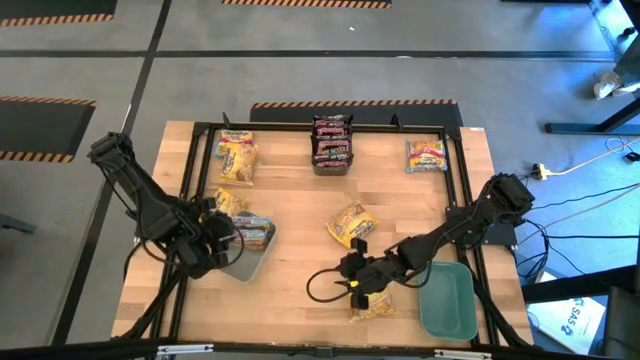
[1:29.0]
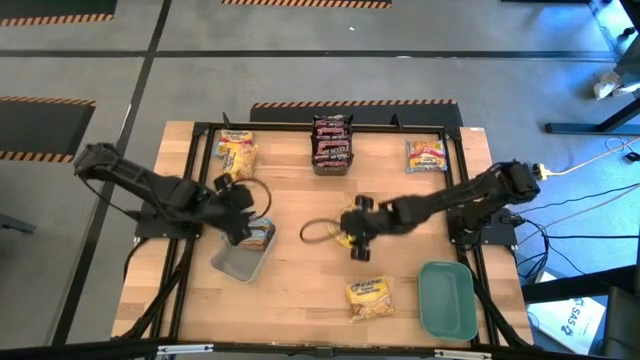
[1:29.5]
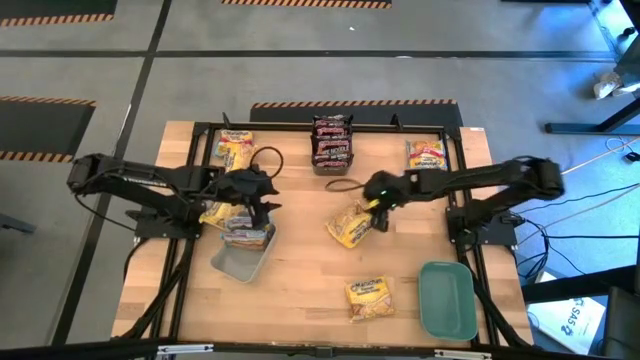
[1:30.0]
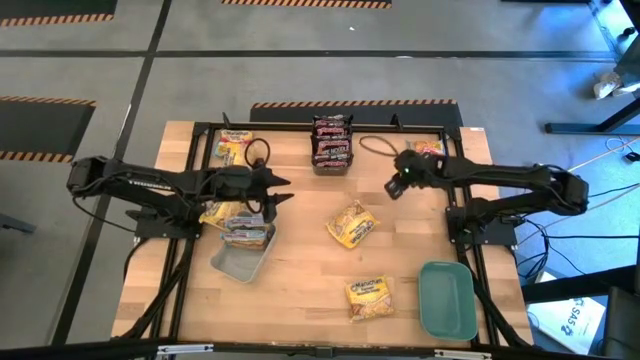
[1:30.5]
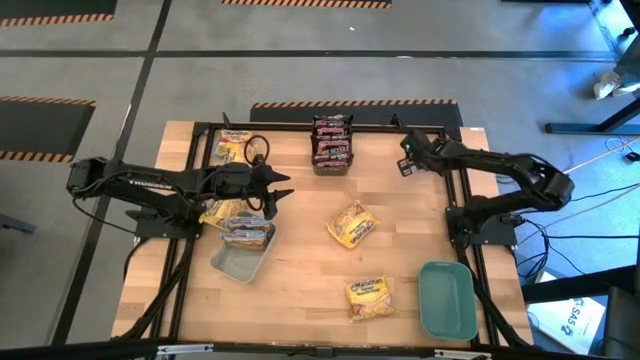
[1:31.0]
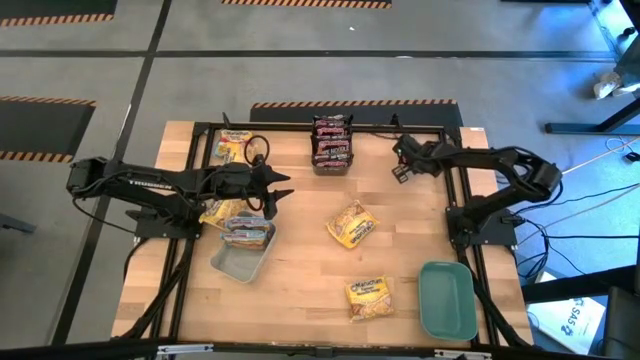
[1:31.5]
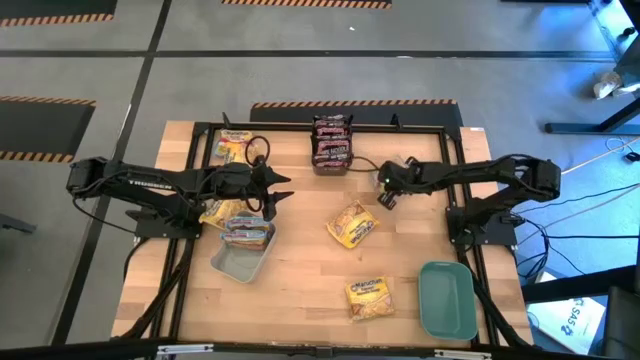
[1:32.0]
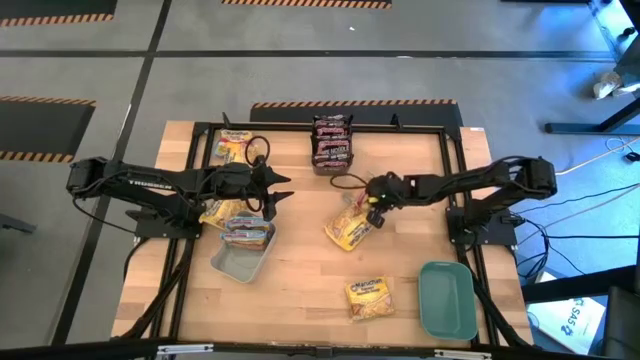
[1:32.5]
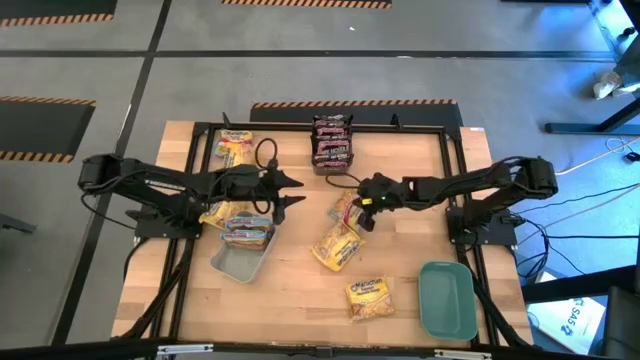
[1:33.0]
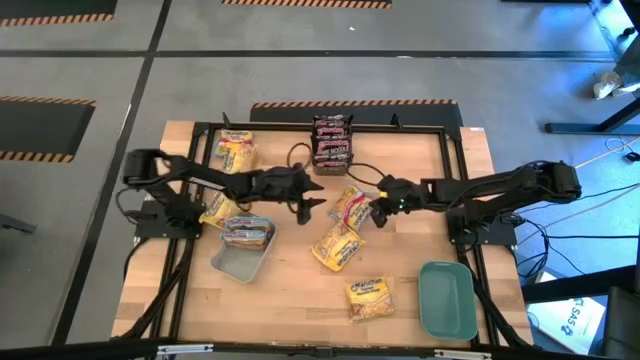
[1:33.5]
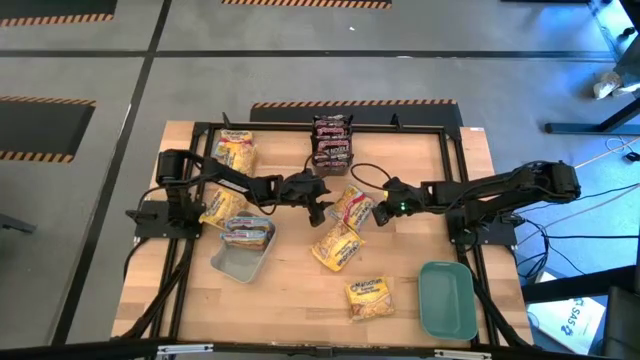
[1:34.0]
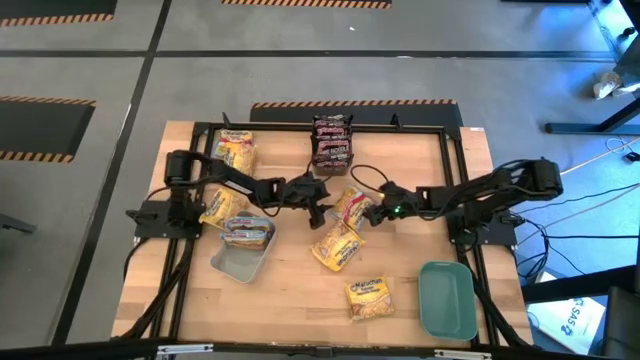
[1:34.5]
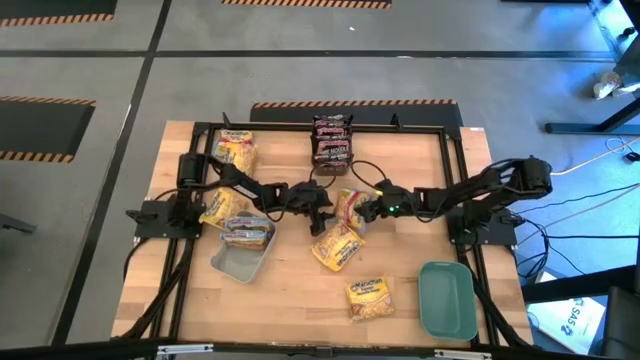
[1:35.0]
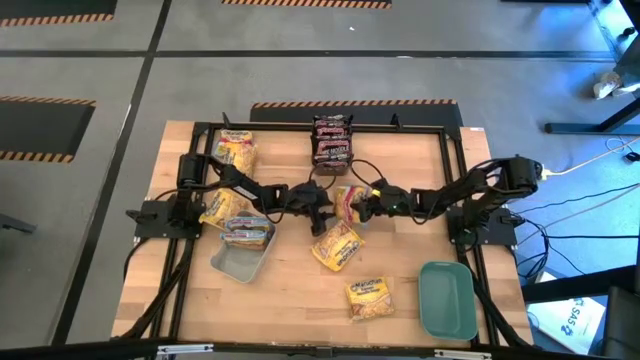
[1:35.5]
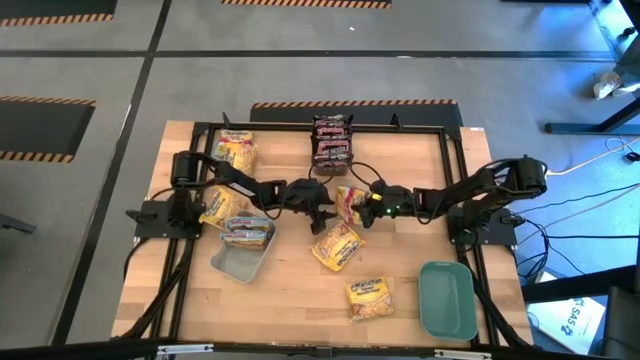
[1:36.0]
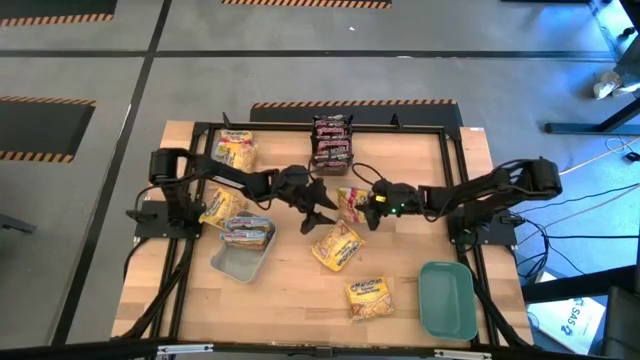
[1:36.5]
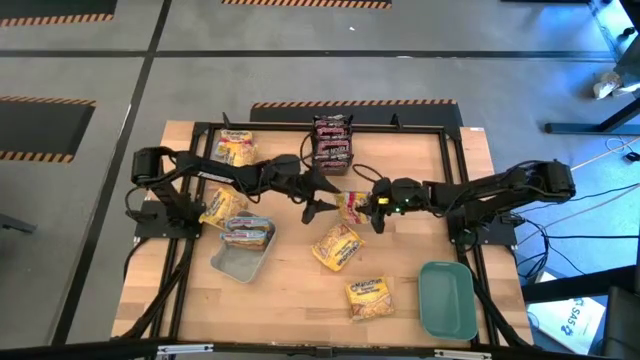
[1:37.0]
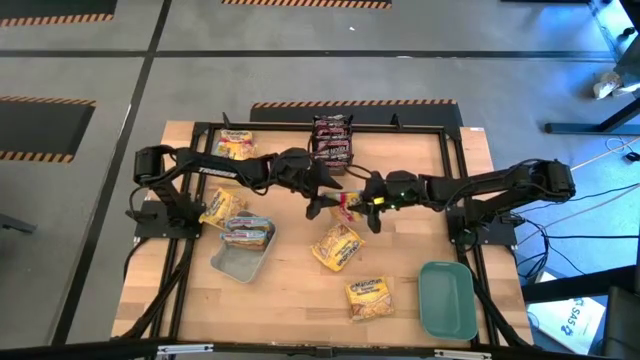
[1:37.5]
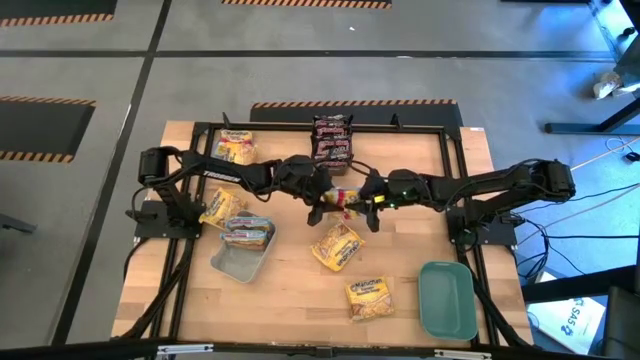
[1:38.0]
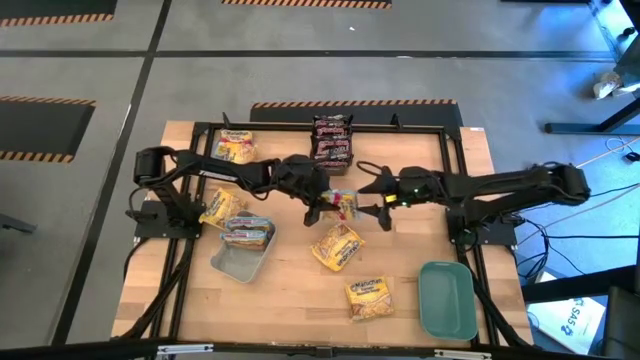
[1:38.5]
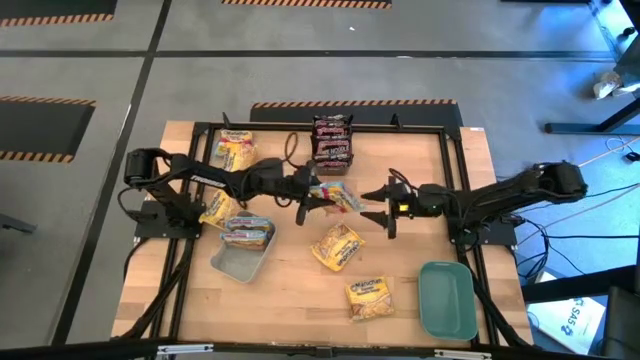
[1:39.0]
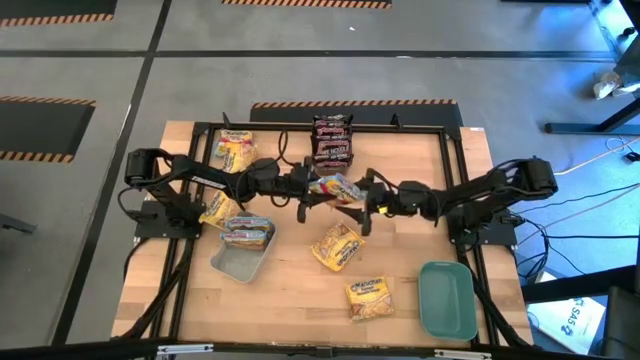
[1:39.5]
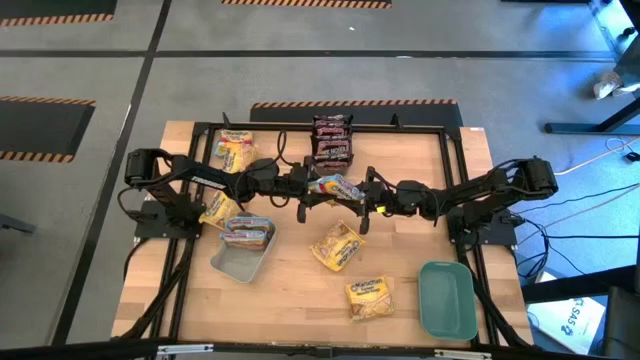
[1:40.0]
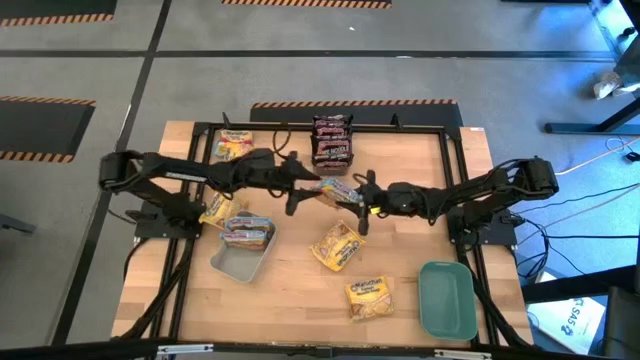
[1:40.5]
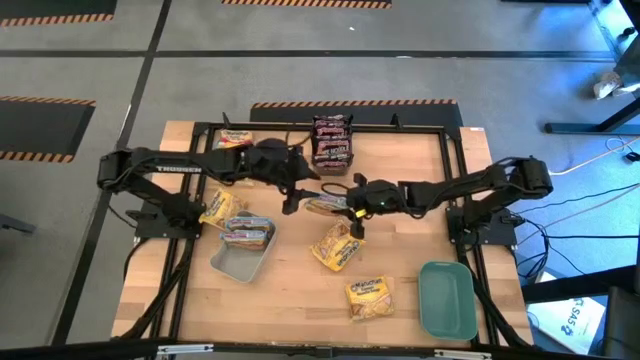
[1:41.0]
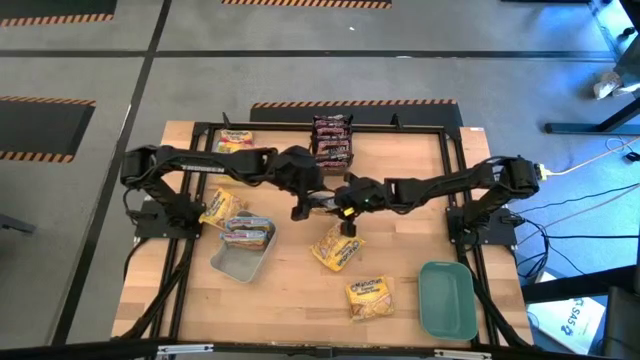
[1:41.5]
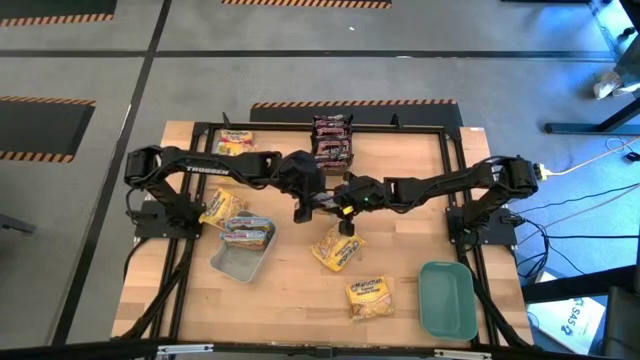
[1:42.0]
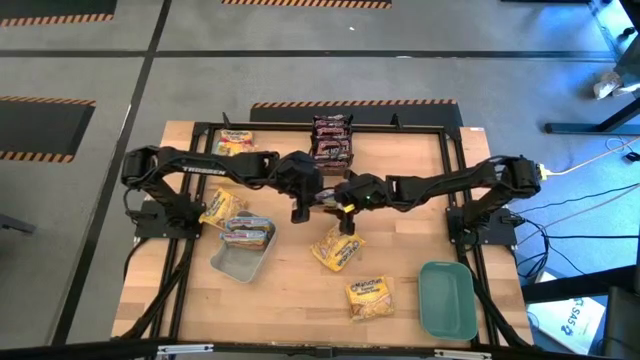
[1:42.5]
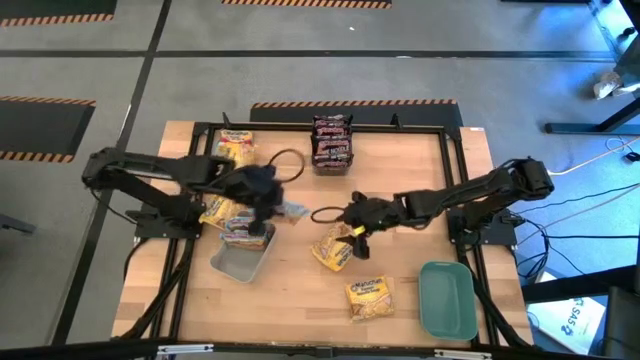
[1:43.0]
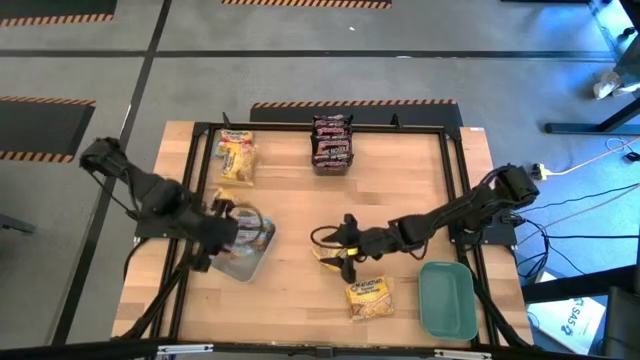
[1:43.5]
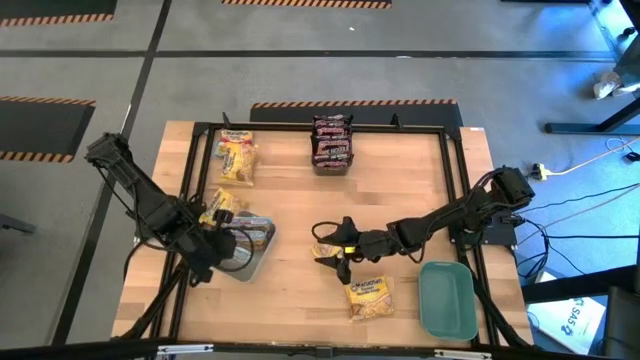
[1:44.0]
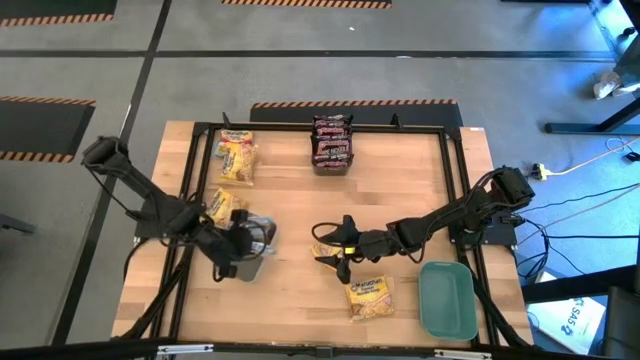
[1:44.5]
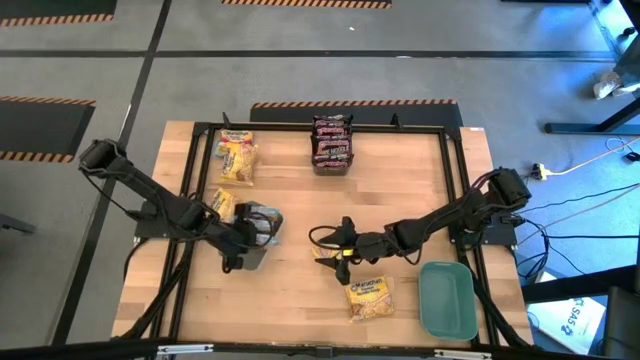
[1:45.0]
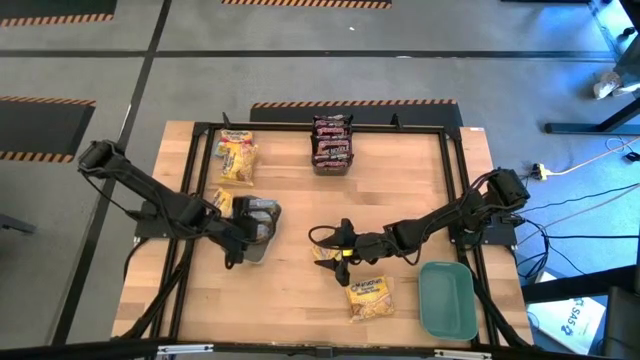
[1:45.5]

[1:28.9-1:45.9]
Task: Sort Maruchan noodles
Put the right blue noodle pack into the gray bin

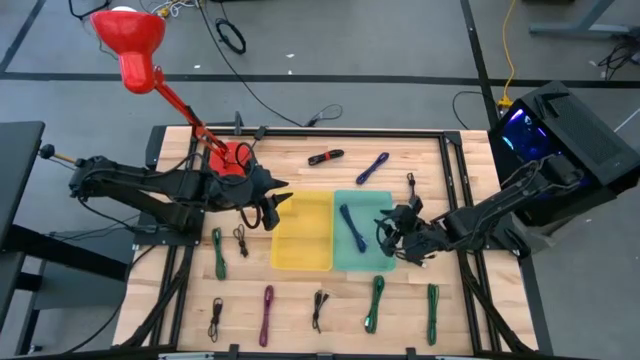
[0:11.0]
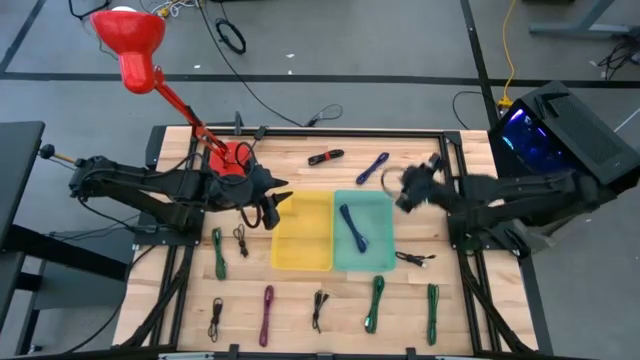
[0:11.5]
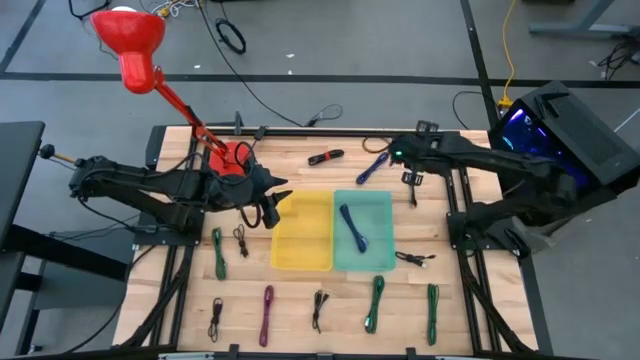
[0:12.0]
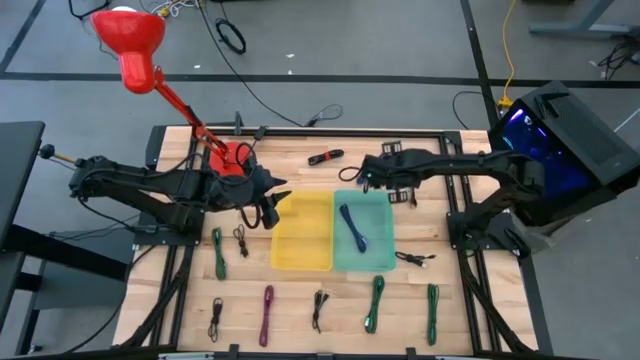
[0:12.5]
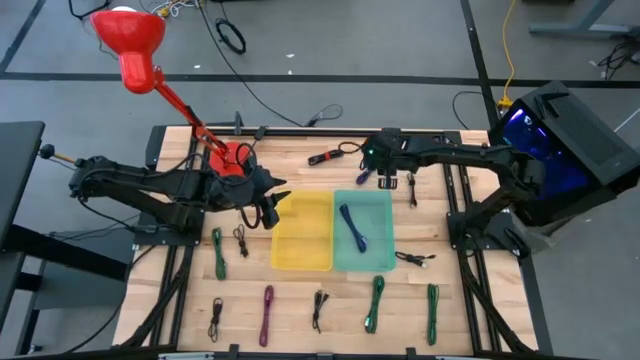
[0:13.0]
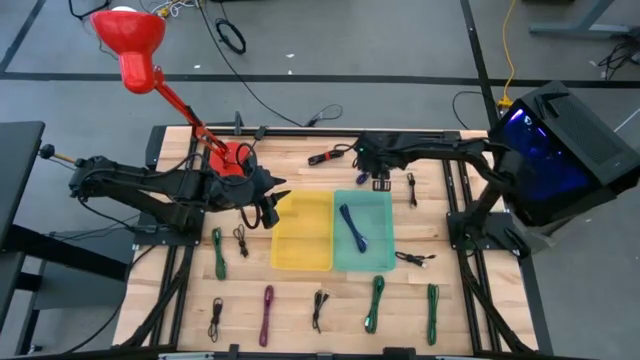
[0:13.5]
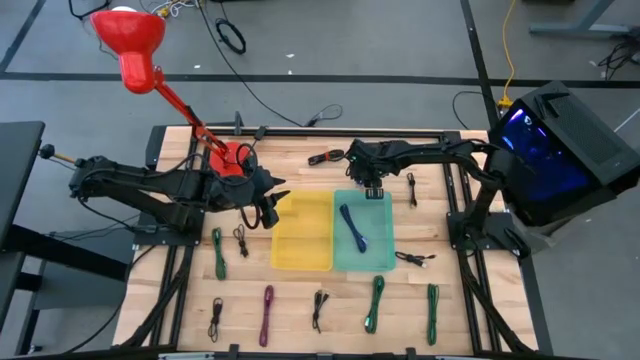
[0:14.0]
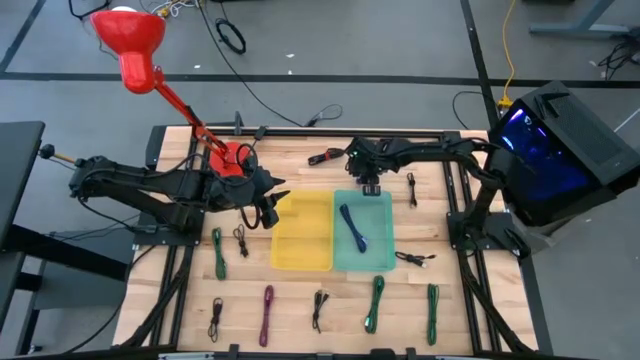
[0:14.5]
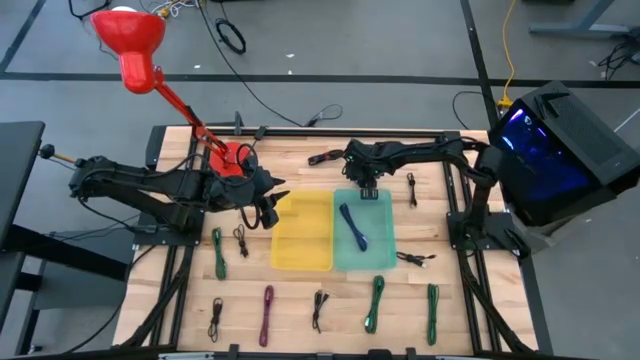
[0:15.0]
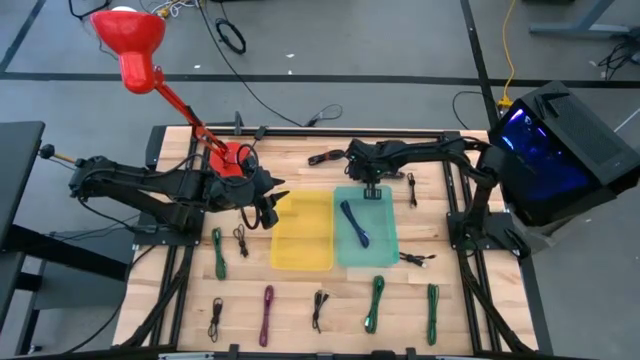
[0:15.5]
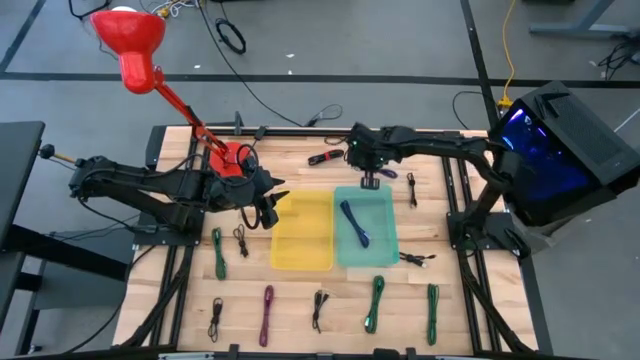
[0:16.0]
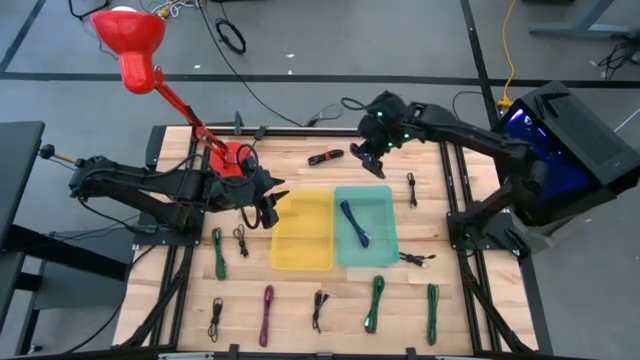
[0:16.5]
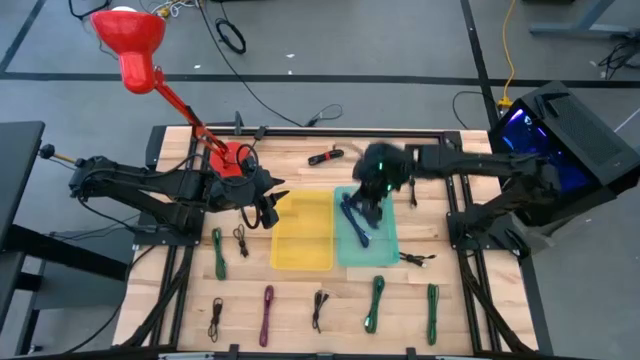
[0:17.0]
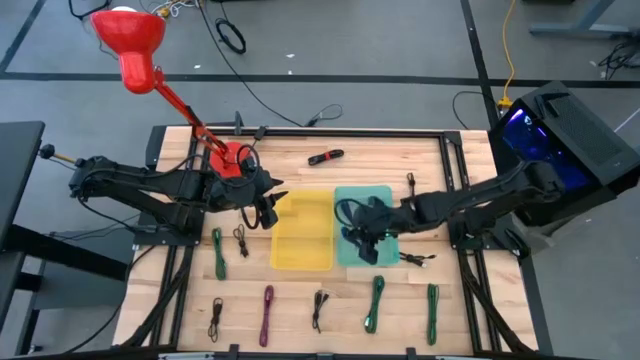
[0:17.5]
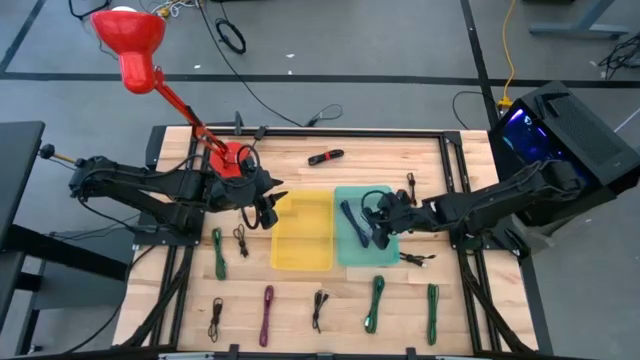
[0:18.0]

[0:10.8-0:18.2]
Task: Pick & Place USB Port
Put the blue charger cable into the green bin
